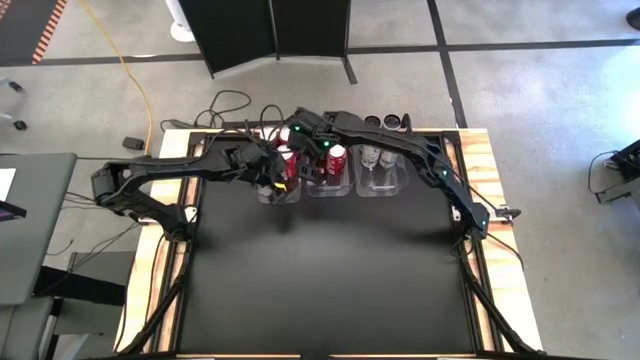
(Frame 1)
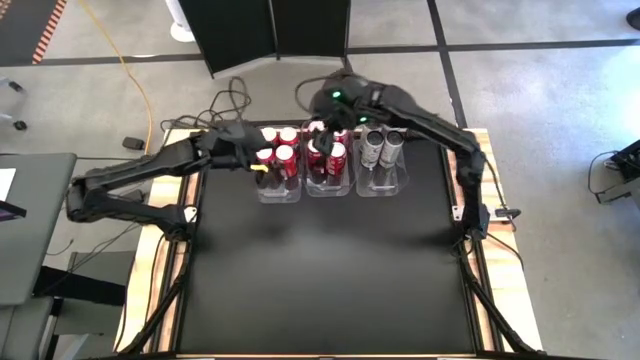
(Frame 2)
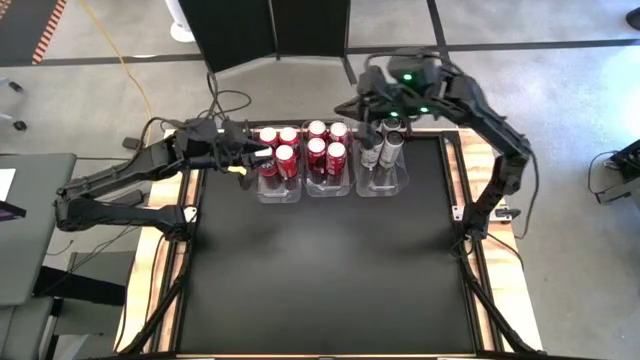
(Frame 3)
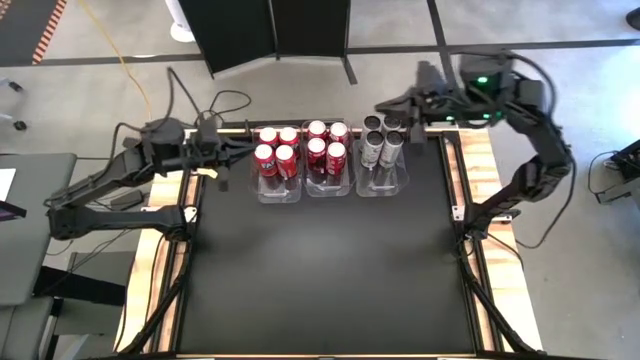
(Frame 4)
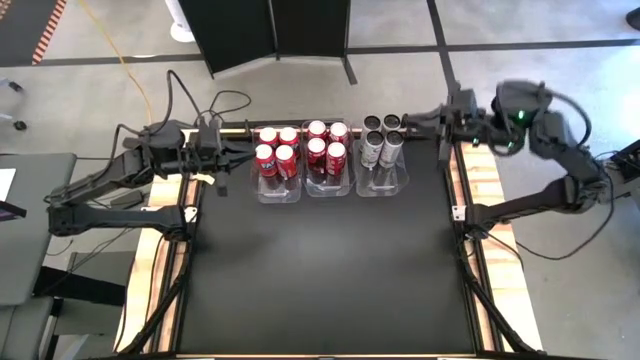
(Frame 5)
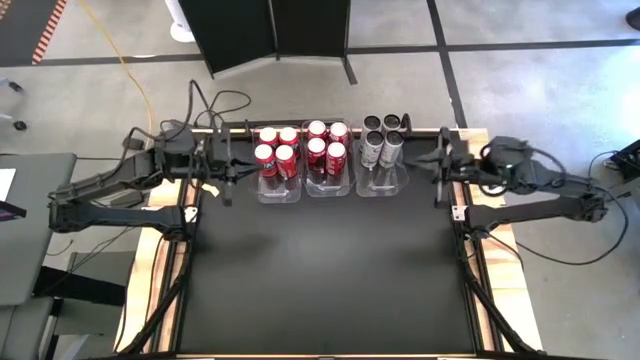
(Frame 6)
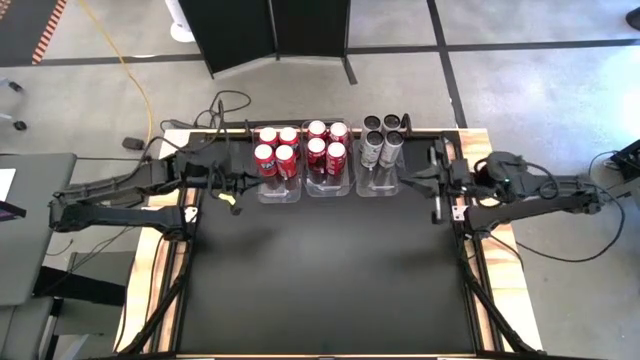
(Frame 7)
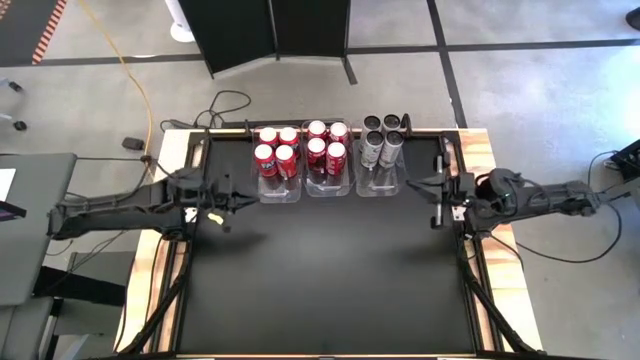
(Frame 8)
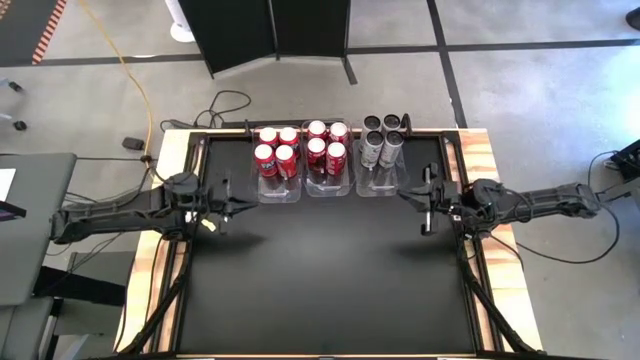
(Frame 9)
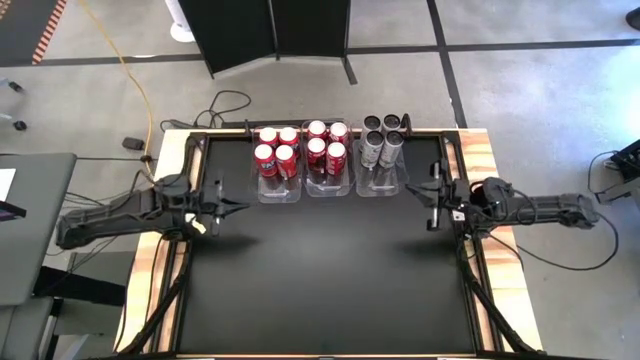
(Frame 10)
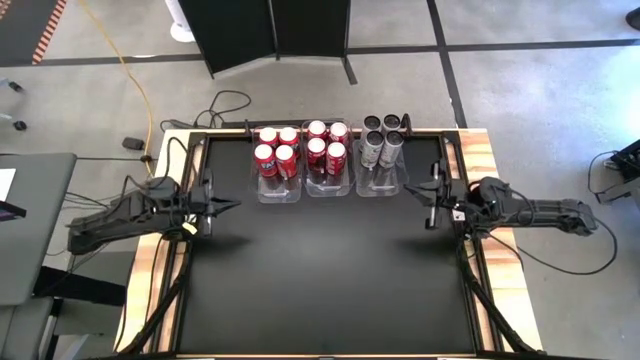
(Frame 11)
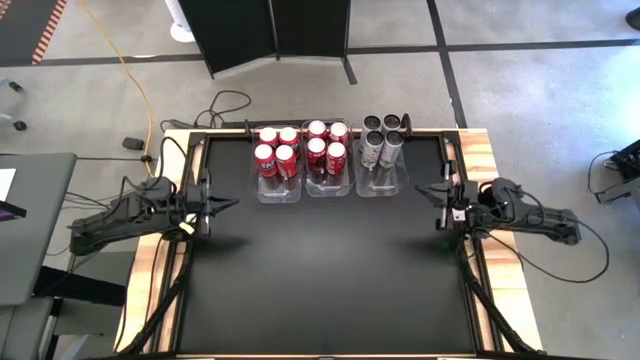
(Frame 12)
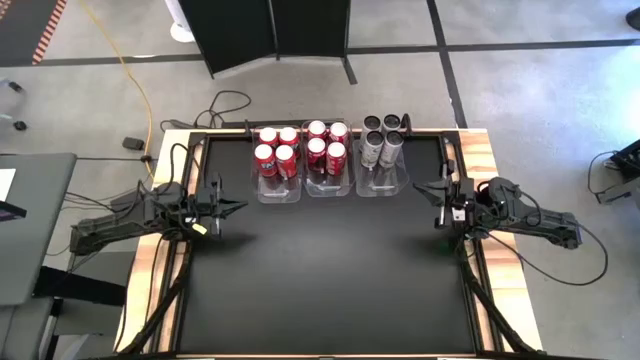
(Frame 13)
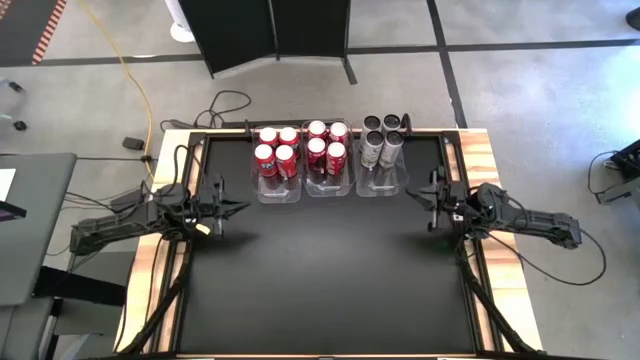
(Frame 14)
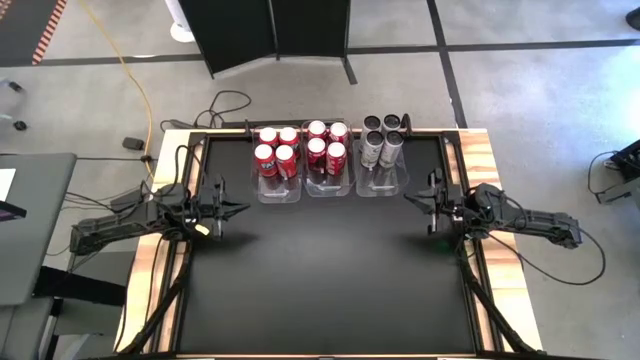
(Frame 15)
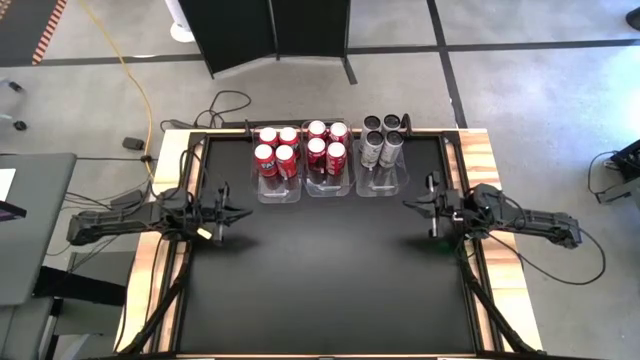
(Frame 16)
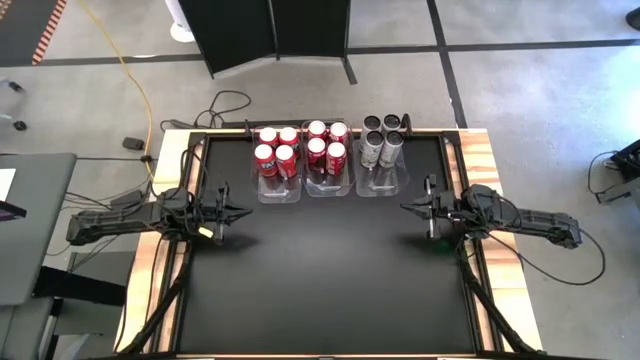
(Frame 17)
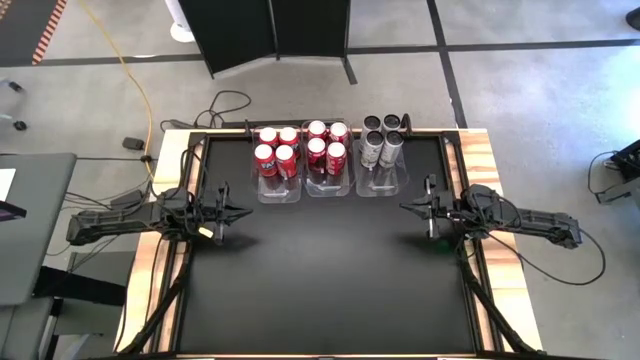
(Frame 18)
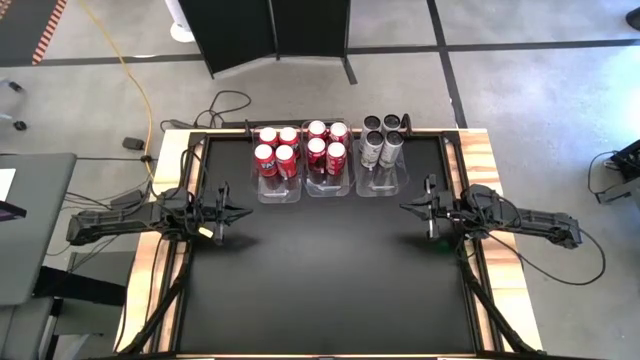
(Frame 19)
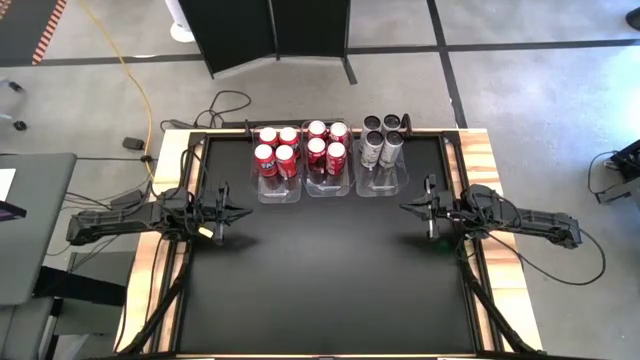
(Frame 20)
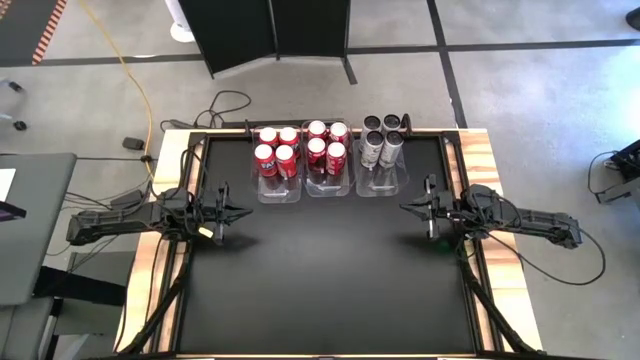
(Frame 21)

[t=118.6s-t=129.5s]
Task: Sort soda cans
Return to Home Position

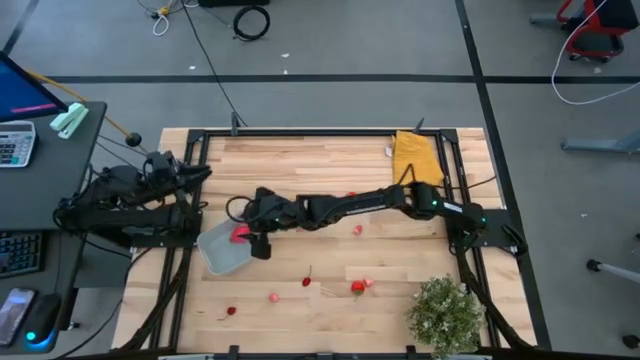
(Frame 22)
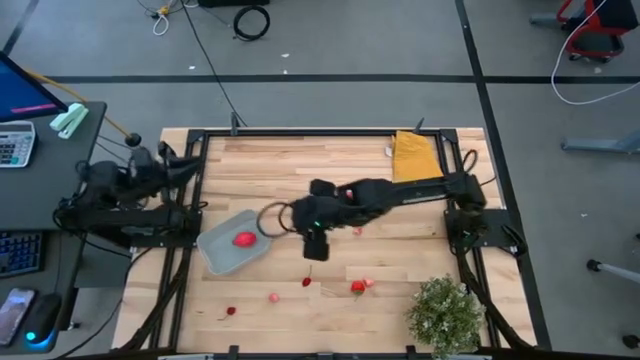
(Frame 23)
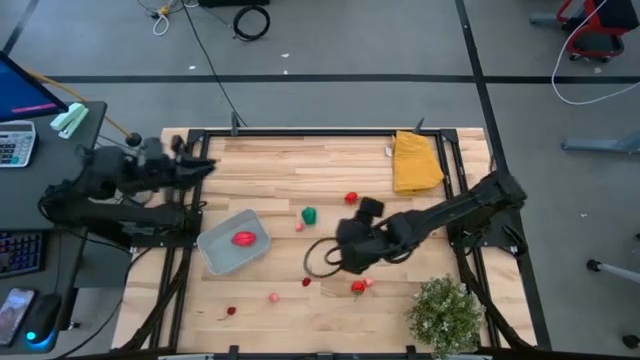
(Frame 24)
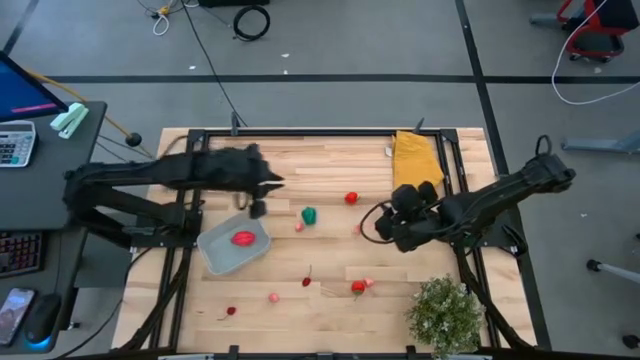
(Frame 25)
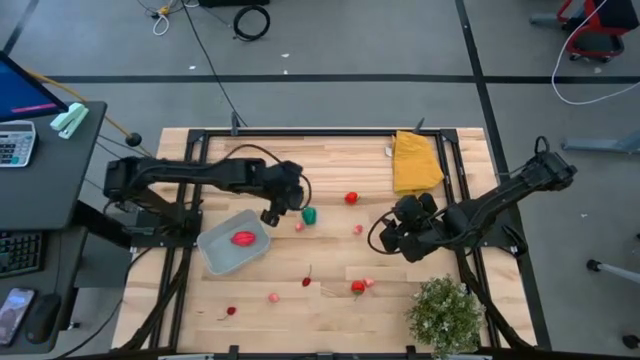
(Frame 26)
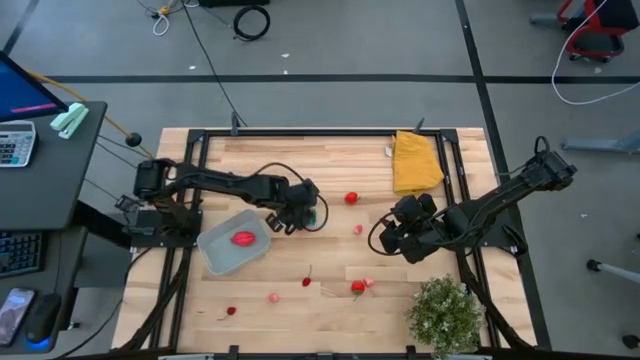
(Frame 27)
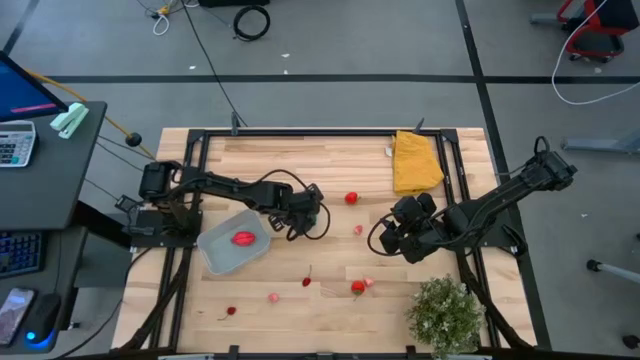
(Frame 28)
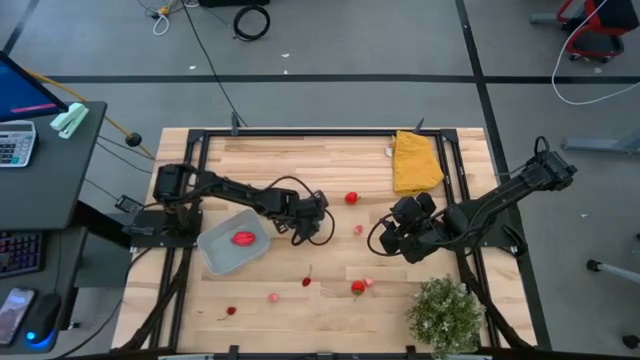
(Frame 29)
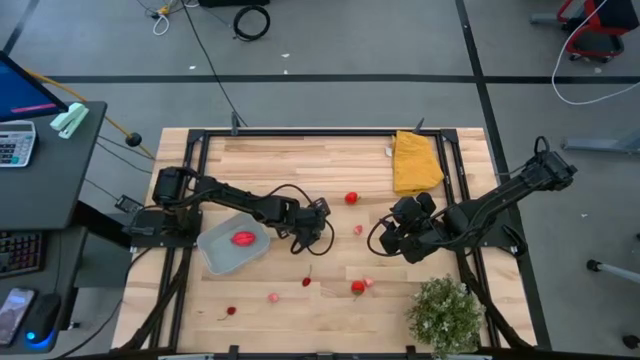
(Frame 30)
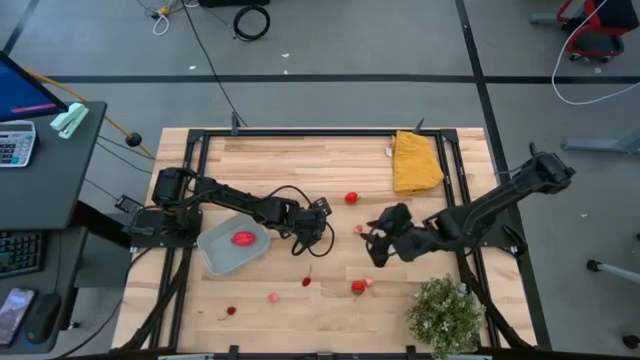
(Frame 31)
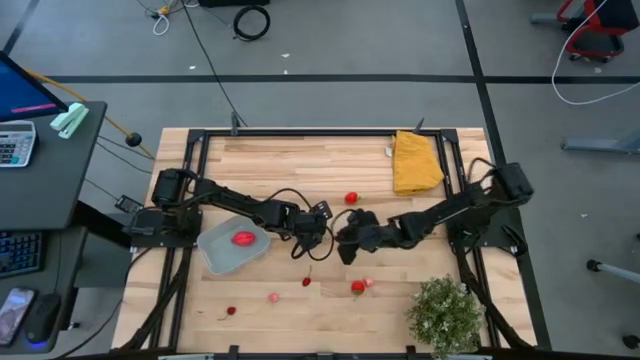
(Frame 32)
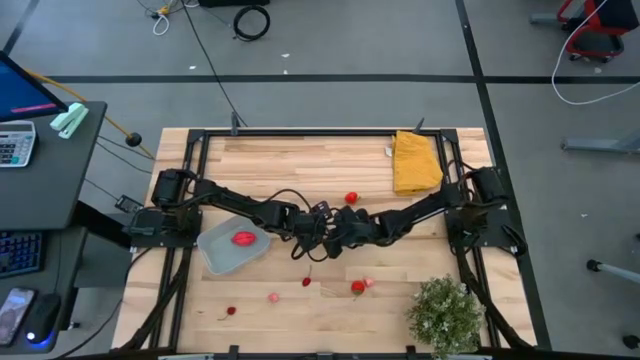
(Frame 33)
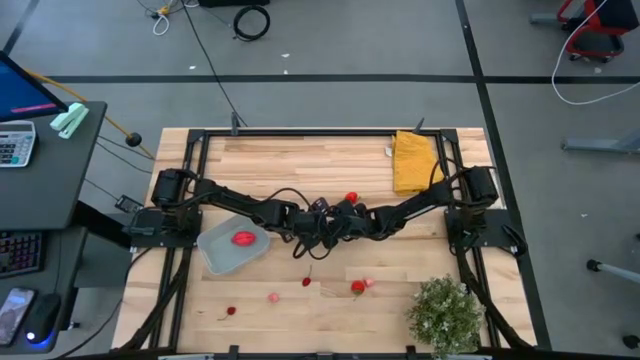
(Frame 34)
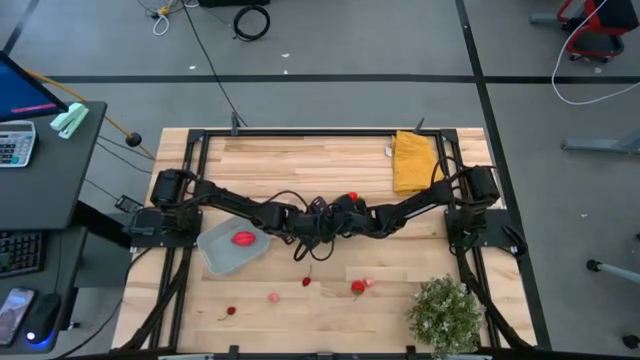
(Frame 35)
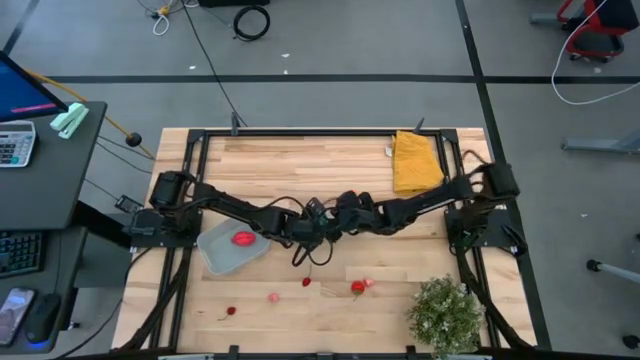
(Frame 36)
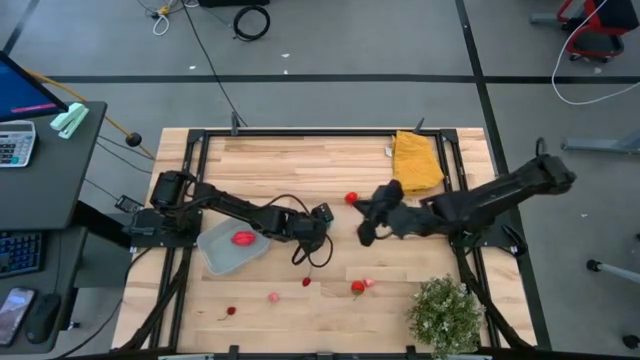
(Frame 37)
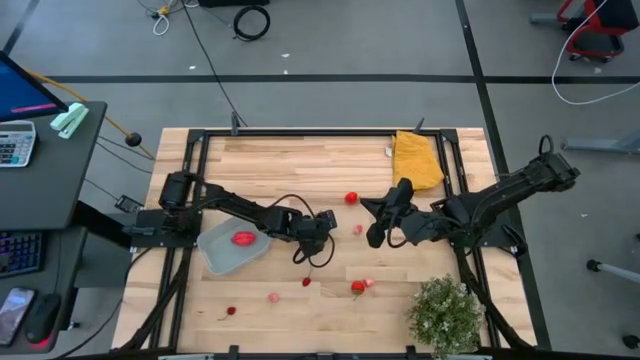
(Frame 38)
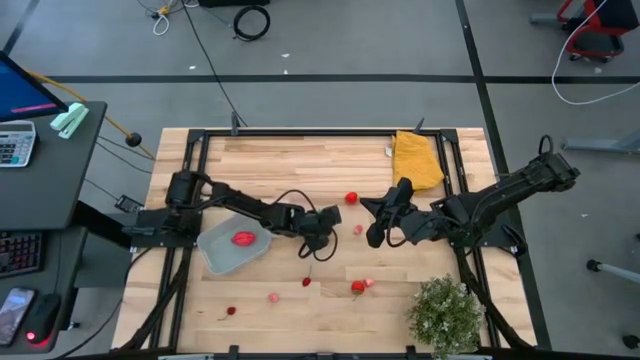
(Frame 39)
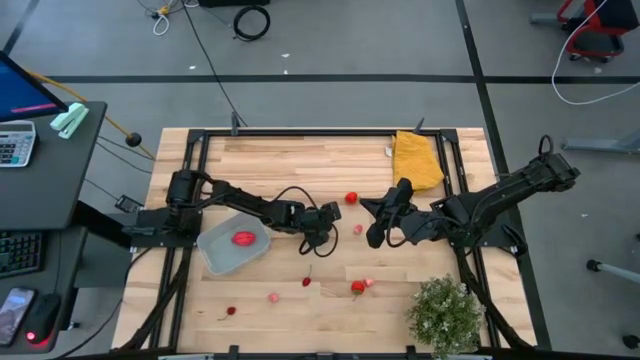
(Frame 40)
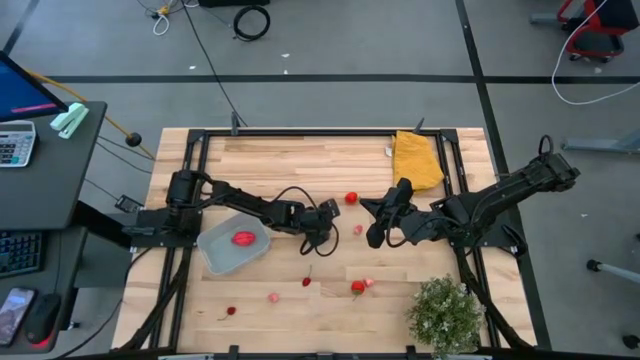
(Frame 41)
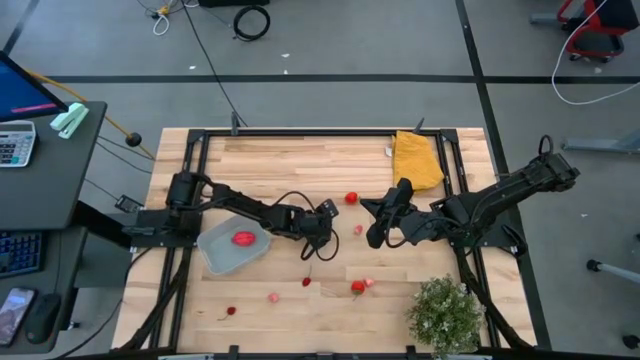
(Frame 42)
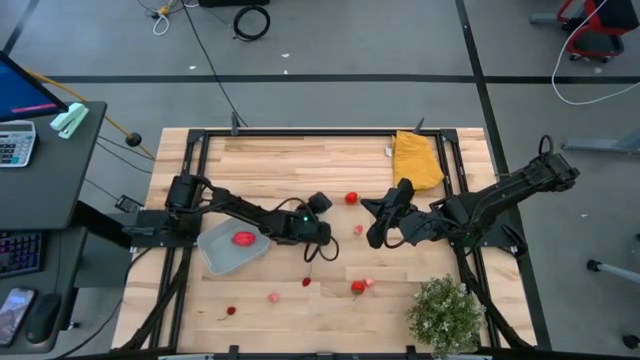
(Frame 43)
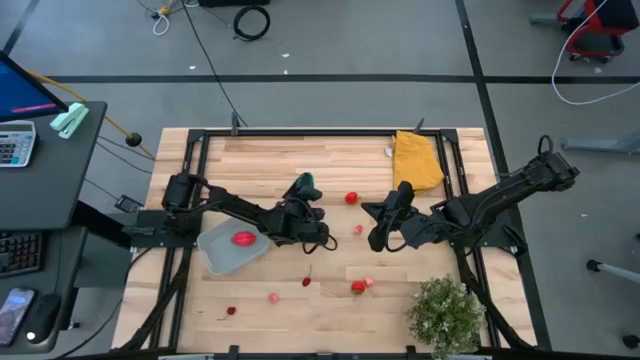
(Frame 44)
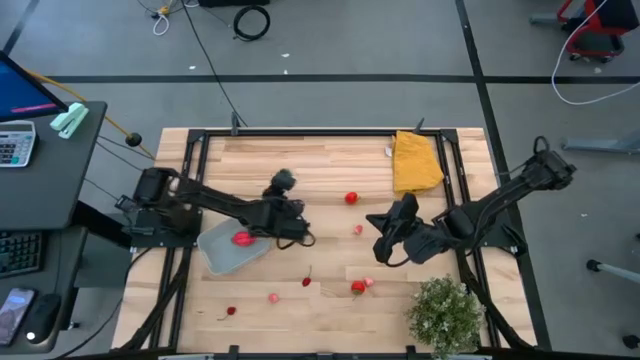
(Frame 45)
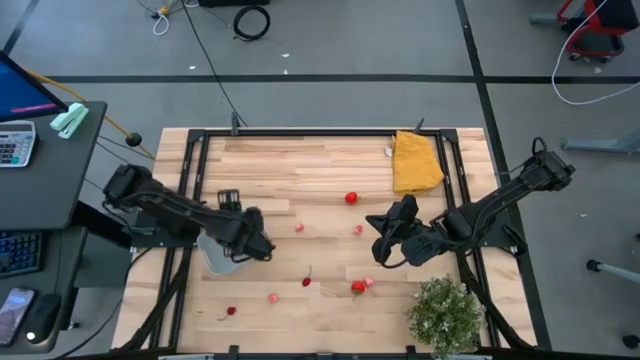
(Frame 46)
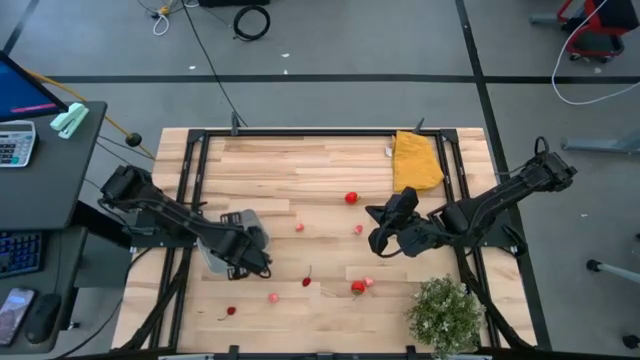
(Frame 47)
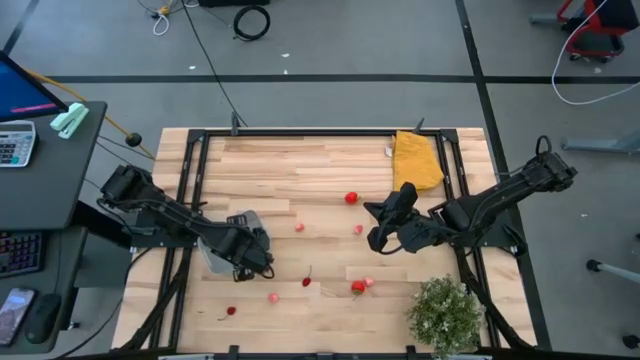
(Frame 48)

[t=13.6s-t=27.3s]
Task: Pick and placing Produce into tupperware
Put the green bell pepper into the gray bin
